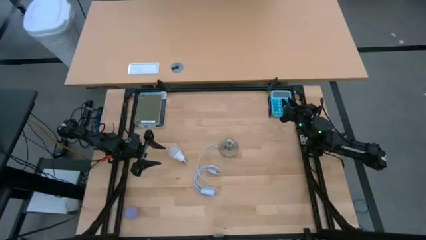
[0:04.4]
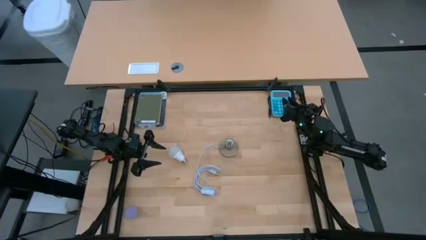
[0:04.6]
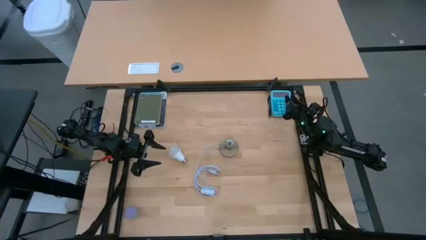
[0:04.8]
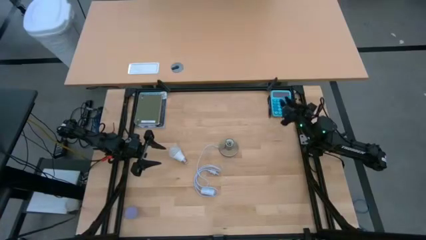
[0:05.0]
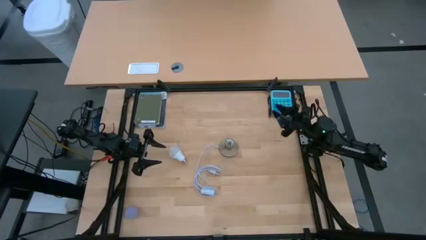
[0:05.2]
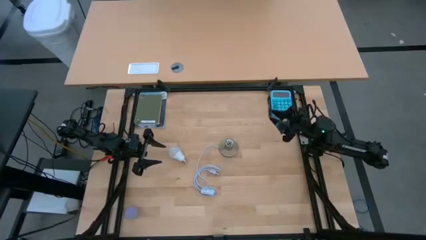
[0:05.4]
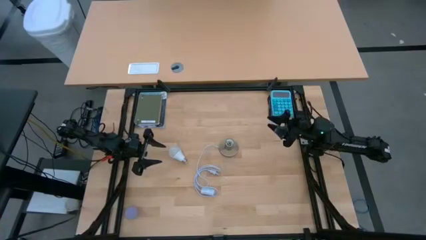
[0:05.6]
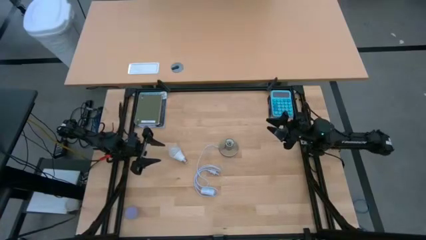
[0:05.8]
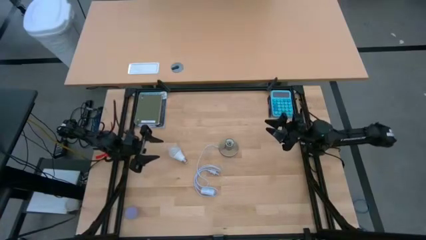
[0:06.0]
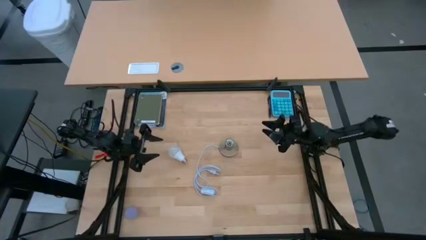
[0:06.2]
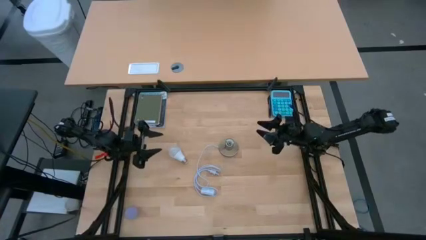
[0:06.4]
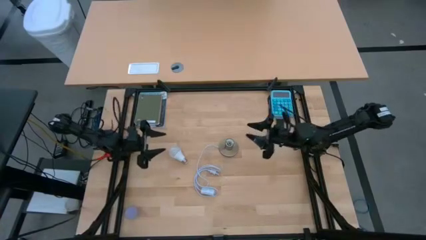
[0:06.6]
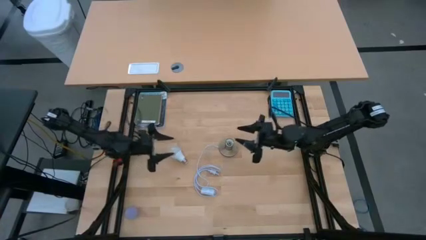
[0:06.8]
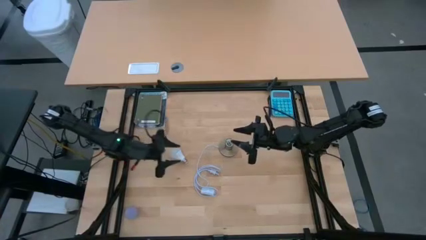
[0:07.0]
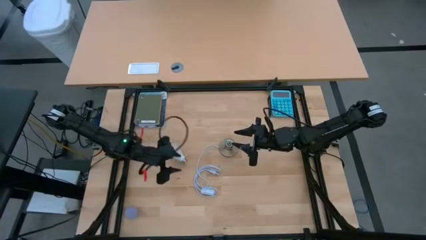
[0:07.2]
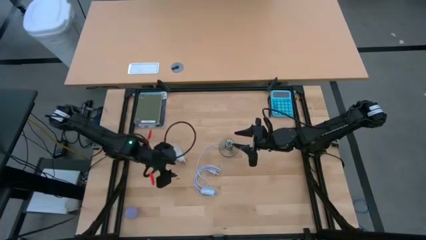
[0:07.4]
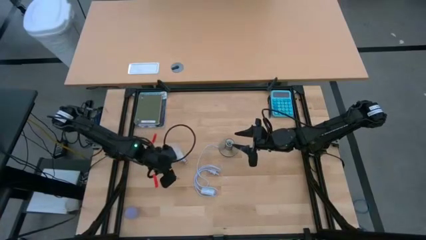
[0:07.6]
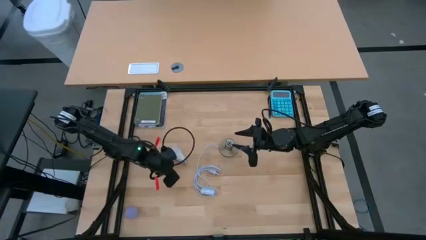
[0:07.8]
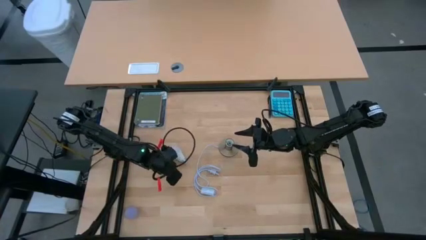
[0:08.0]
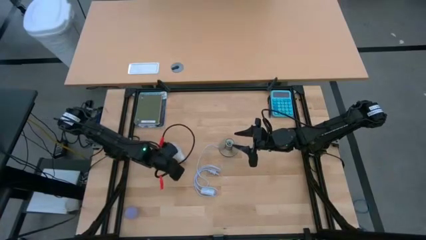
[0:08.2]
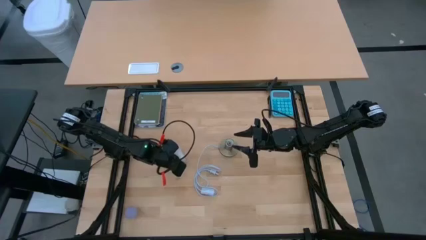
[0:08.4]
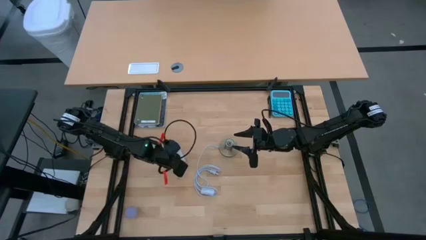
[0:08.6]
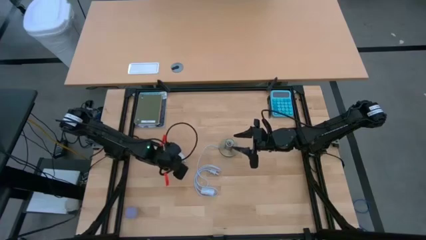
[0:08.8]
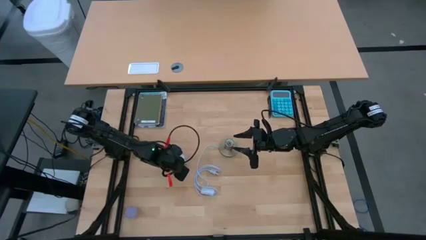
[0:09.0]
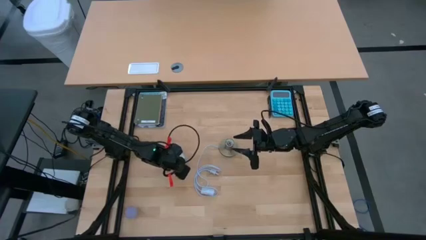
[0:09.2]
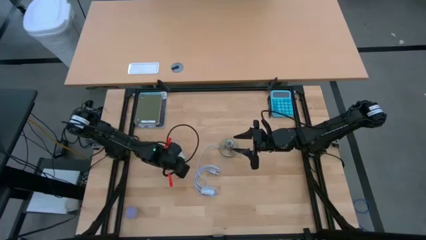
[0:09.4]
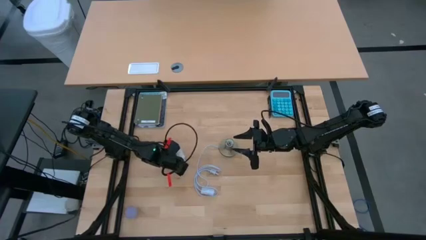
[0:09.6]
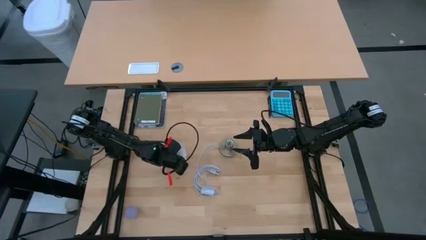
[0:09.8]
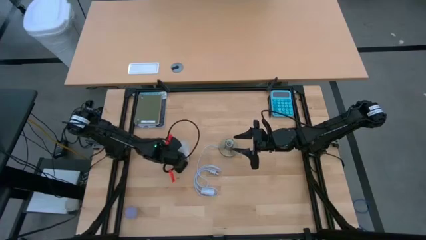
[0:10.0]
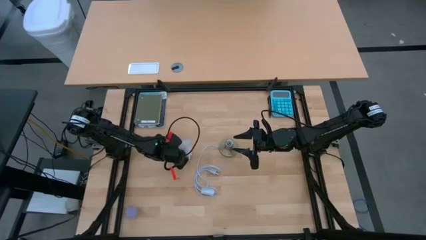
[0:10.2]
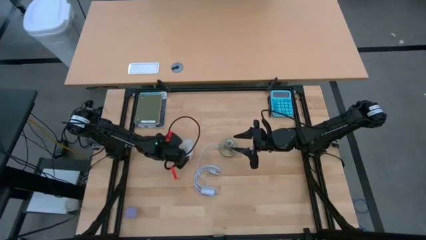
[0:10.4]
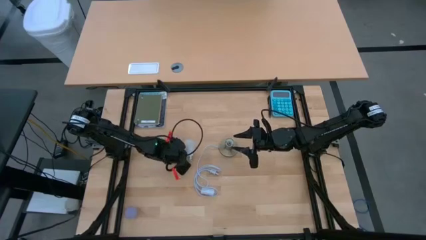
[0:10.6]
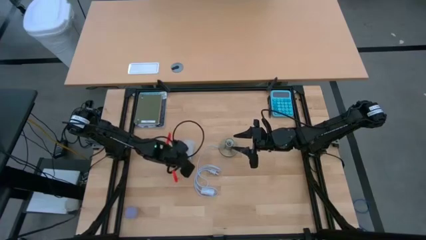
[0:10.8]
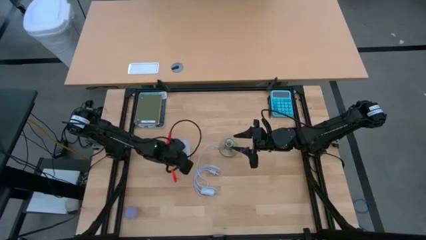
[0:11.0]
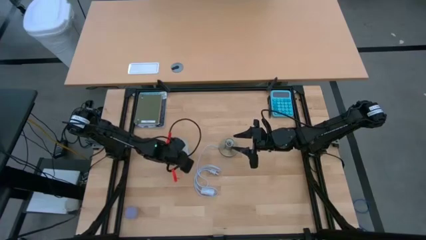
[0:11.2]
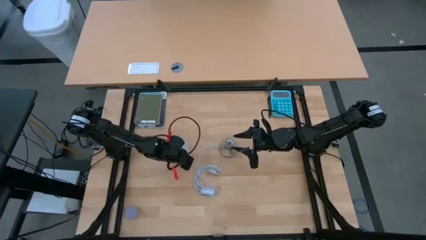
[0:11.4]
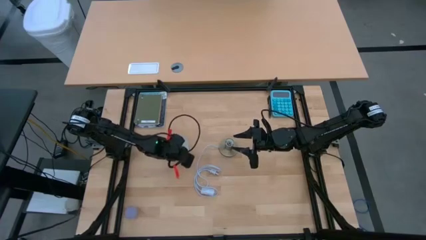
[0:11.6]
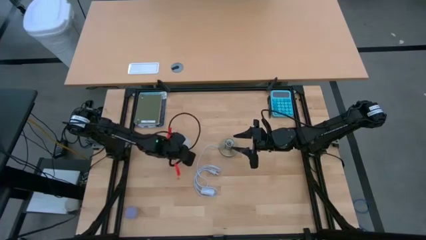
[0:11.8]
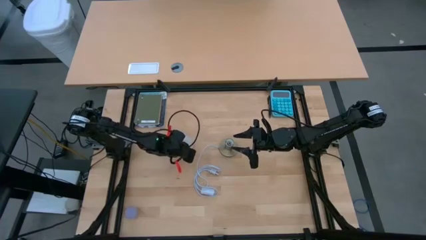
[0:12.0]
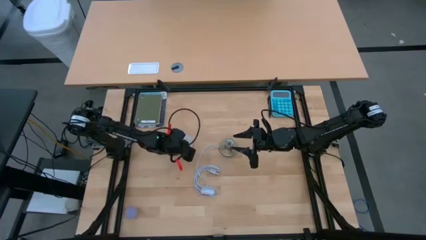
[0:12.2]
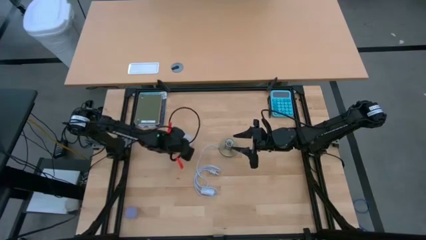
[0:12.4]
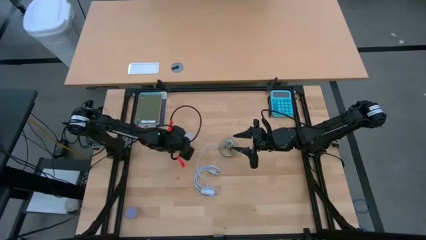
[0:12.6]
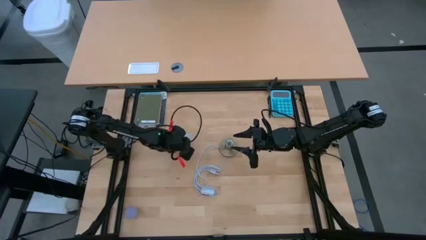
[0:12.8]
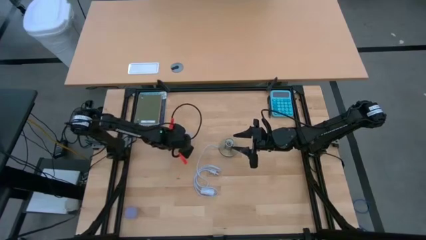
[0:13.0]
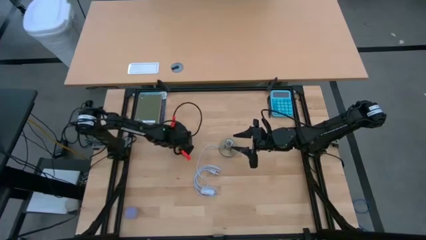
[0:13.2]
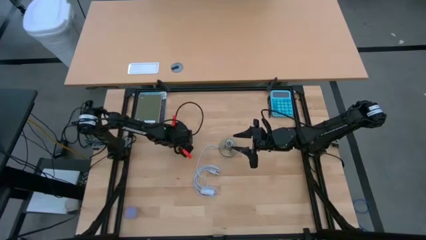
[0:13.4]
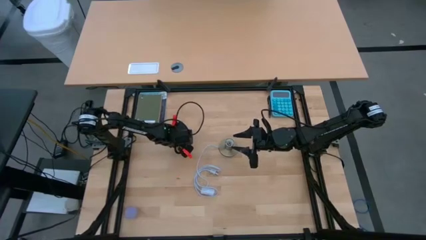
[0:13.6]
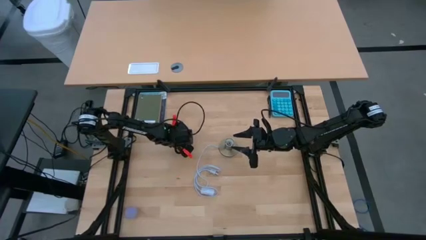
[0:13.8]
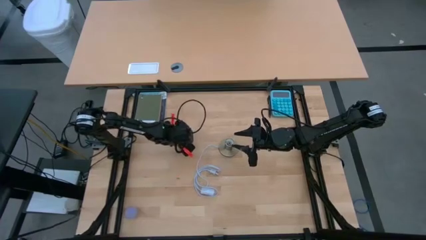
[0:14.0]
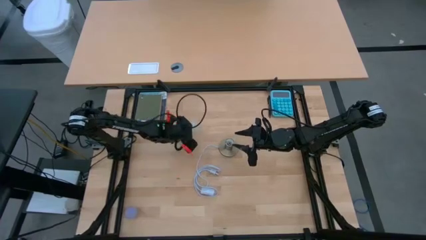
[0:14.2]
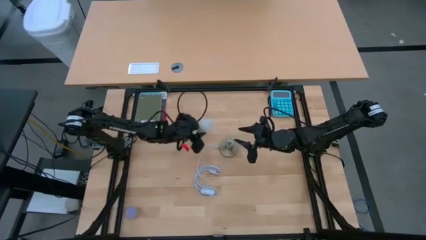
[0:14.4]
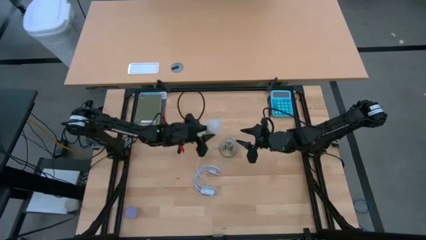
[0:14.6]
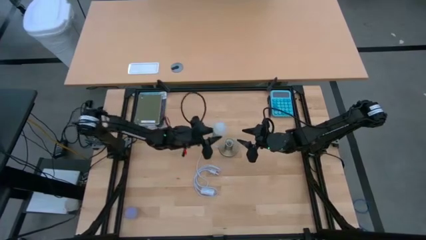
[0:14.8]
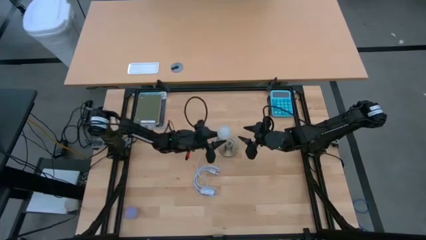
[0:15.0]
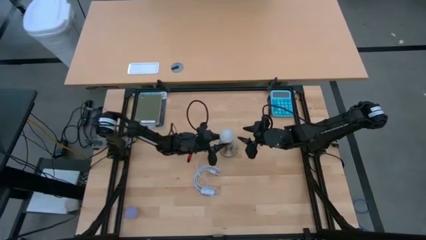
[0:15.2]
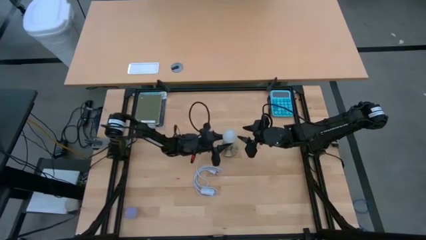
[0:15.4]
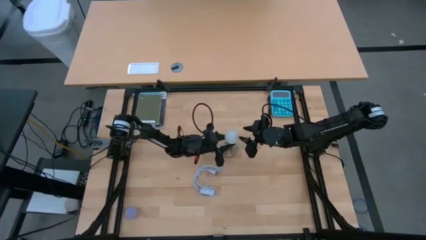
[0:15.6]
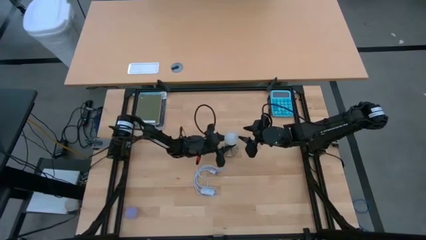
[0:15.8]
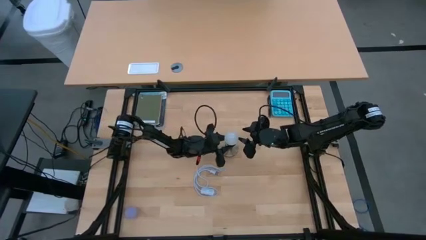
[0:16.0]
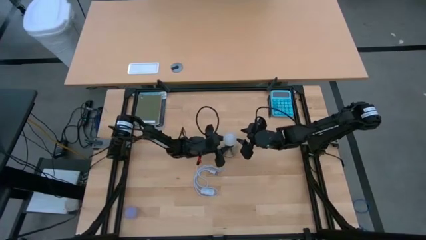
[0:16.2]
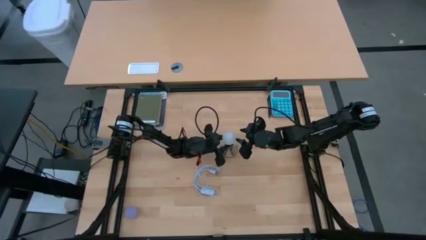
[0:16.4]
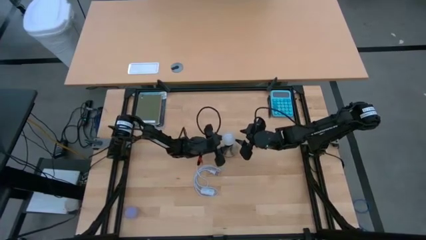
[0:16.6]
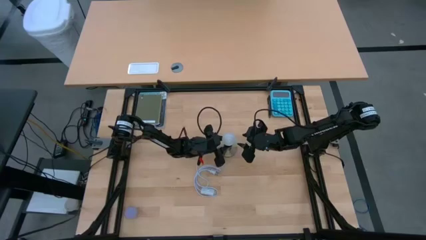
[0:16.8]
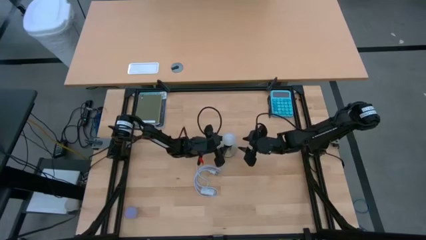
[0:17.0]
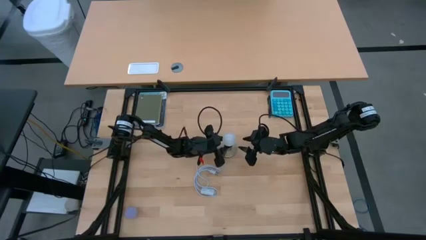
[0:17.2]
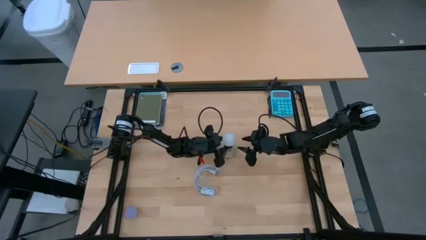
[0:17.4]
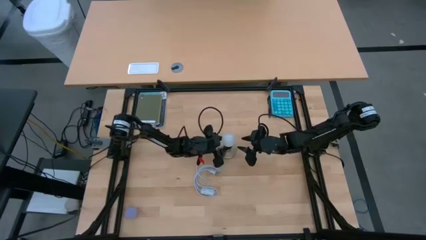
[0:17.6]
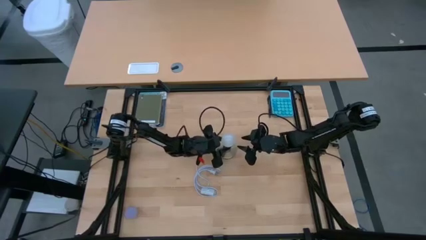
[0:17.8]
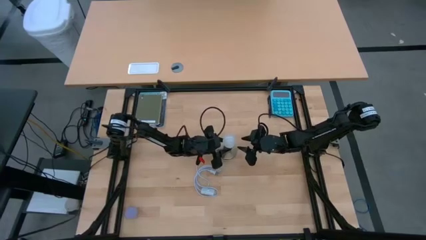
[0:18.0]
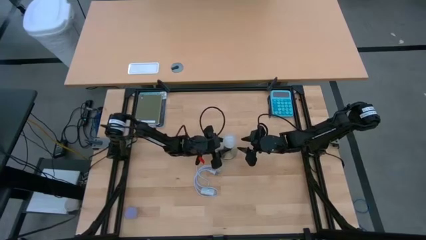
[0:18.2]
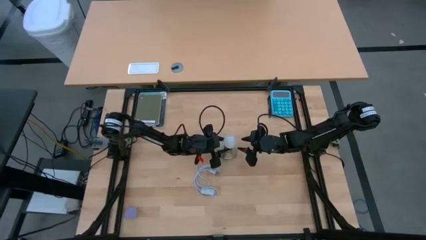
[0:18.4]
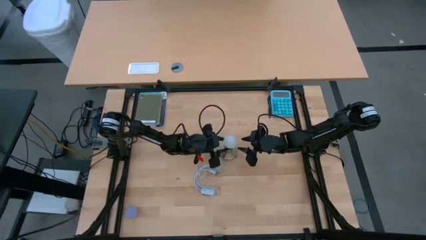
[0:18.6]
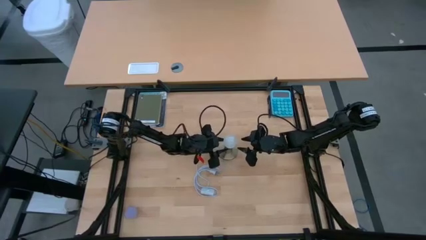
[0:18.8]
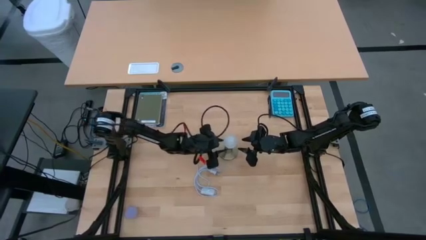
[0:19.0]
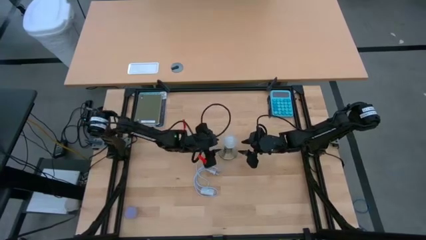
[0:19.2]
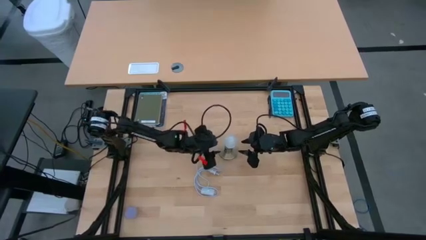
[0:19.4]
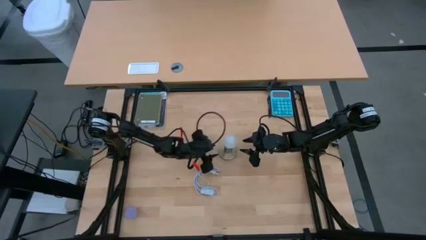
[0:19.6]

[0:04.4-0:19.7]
Task: Screw lightbulb
Insert the white lightbulb into the silver lamp
